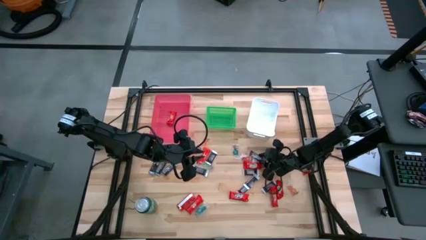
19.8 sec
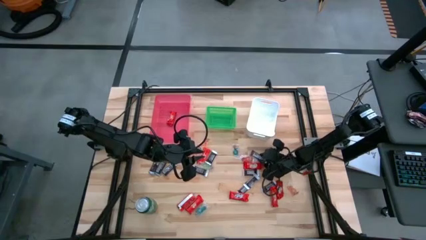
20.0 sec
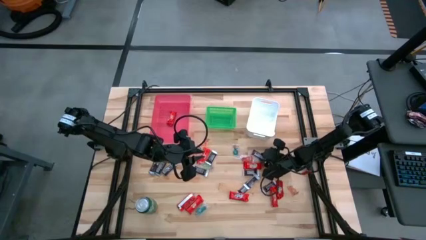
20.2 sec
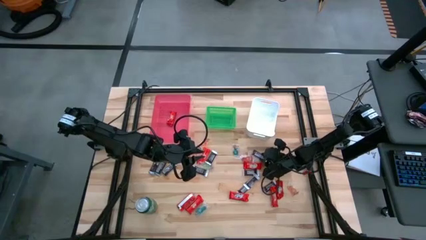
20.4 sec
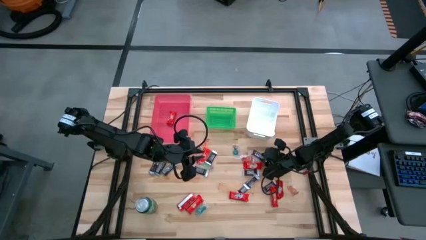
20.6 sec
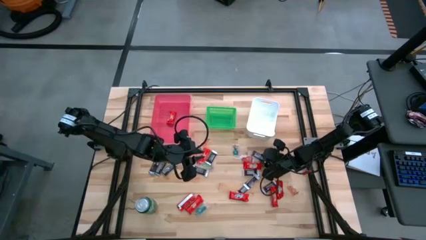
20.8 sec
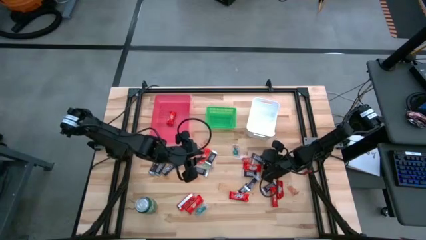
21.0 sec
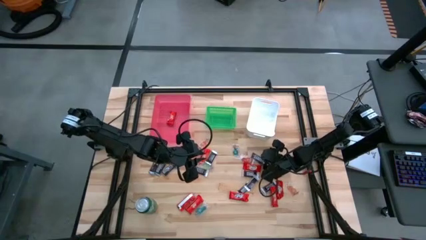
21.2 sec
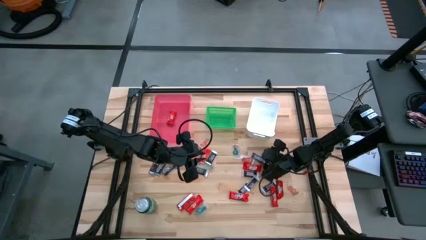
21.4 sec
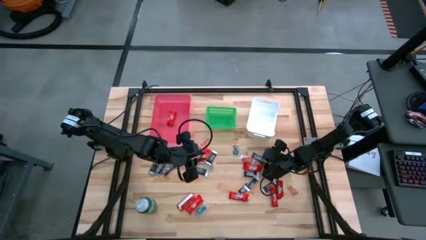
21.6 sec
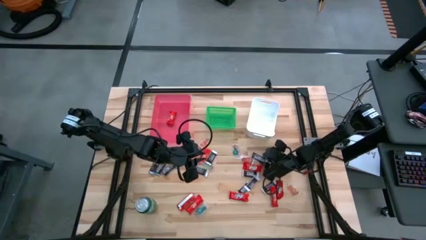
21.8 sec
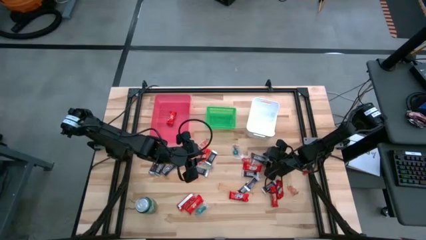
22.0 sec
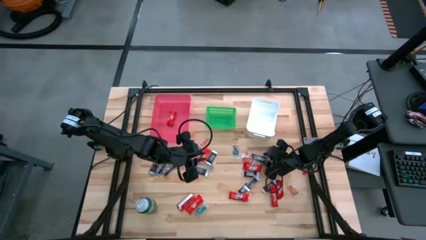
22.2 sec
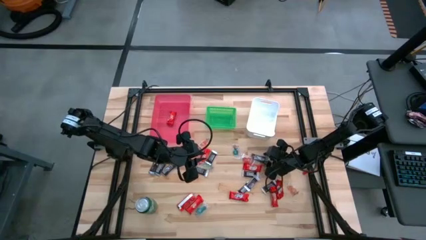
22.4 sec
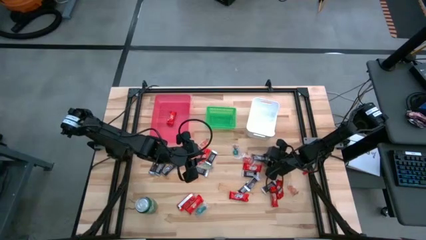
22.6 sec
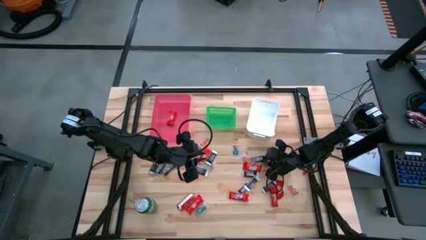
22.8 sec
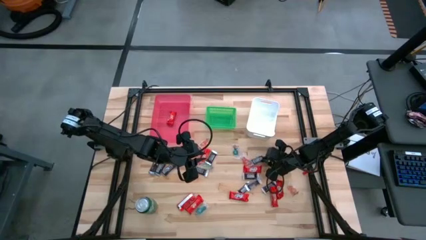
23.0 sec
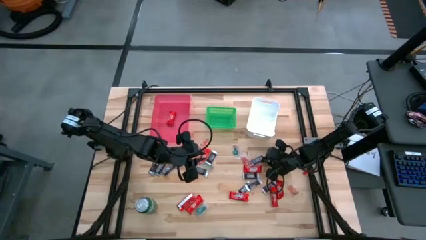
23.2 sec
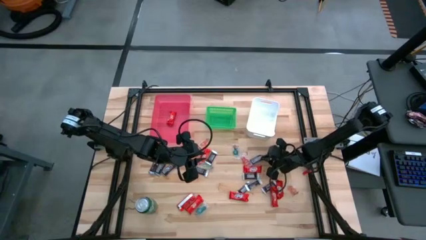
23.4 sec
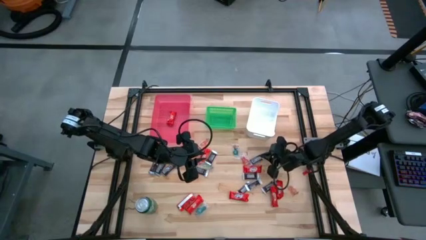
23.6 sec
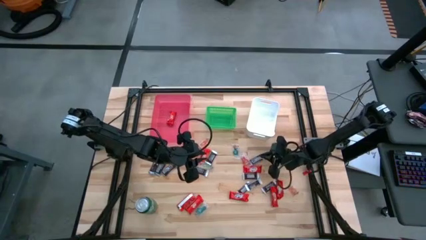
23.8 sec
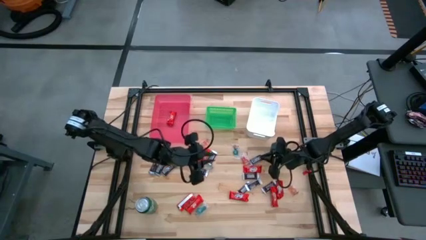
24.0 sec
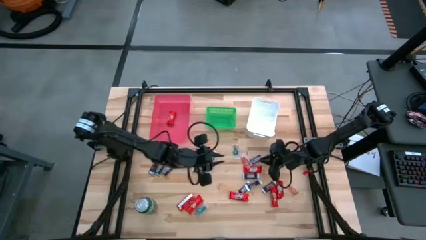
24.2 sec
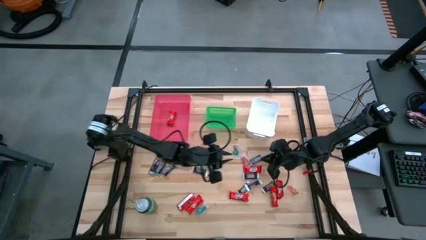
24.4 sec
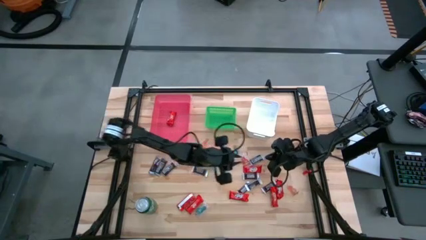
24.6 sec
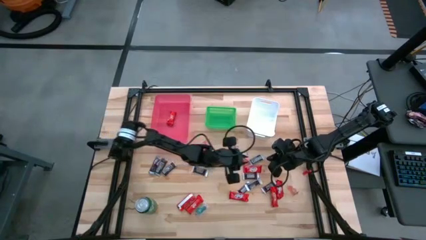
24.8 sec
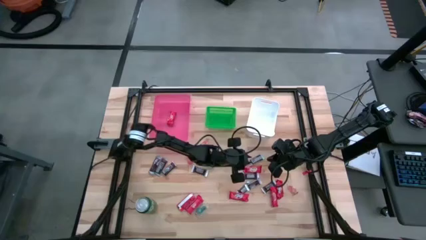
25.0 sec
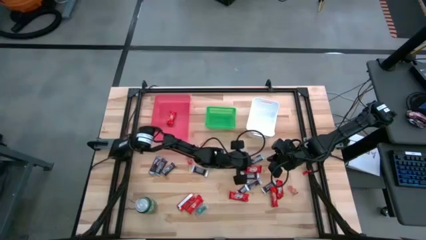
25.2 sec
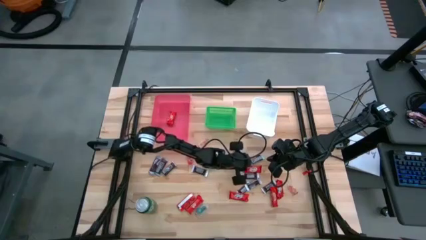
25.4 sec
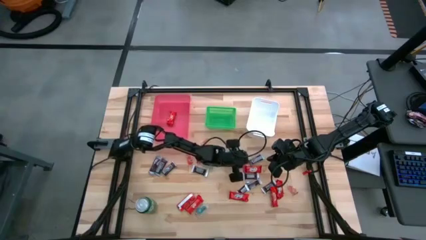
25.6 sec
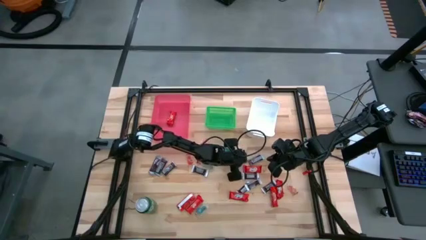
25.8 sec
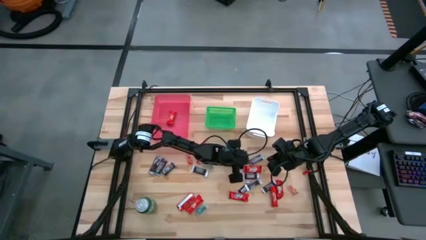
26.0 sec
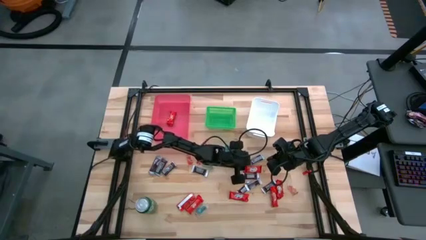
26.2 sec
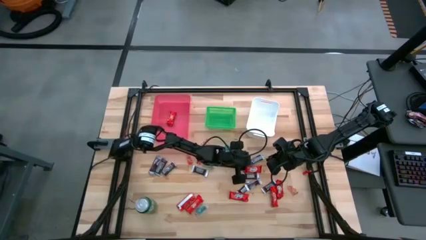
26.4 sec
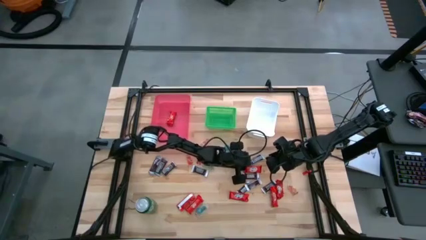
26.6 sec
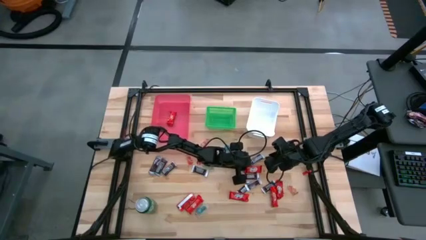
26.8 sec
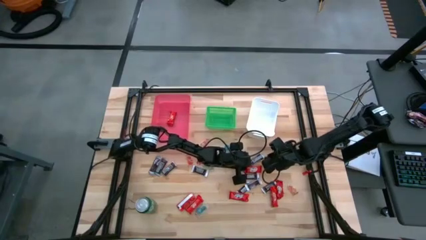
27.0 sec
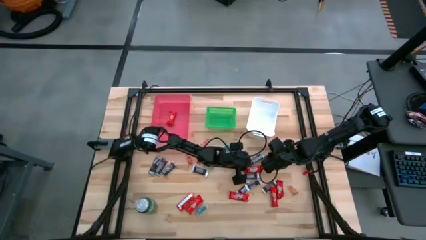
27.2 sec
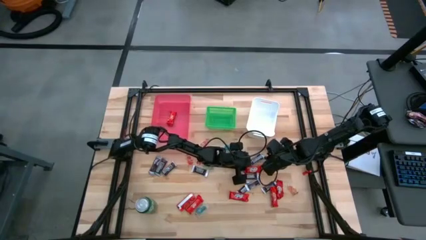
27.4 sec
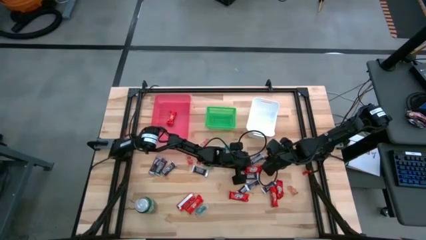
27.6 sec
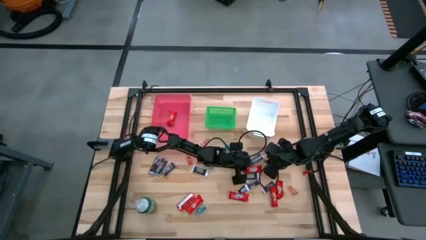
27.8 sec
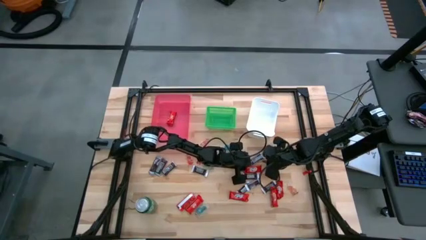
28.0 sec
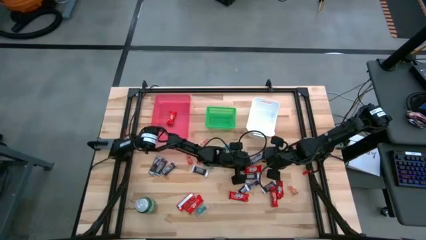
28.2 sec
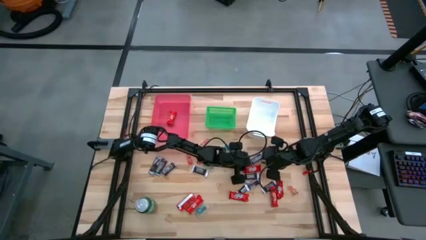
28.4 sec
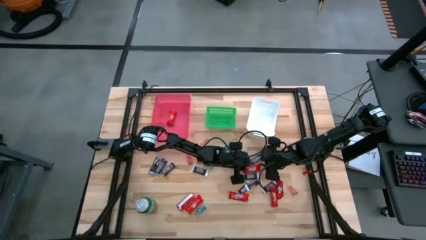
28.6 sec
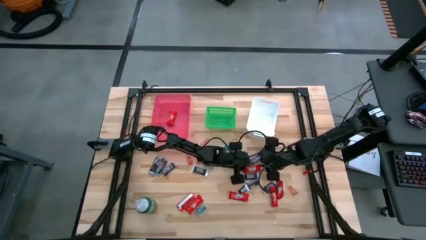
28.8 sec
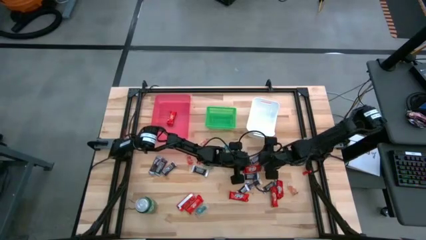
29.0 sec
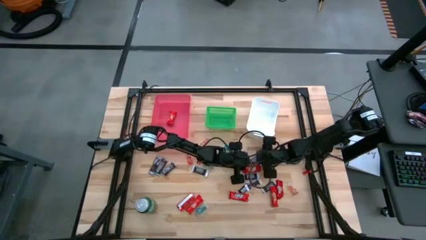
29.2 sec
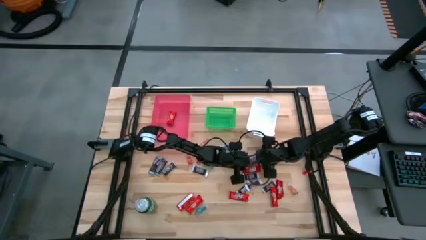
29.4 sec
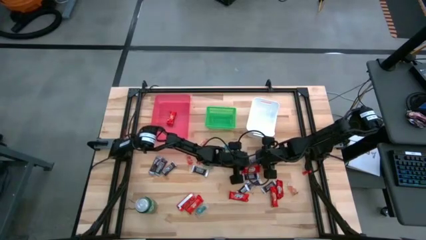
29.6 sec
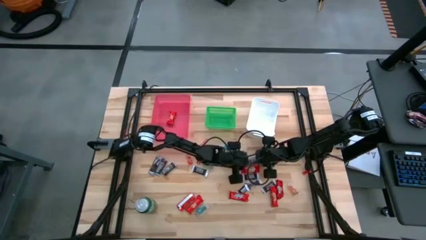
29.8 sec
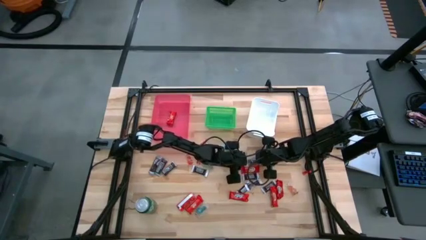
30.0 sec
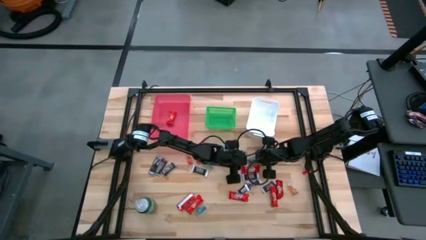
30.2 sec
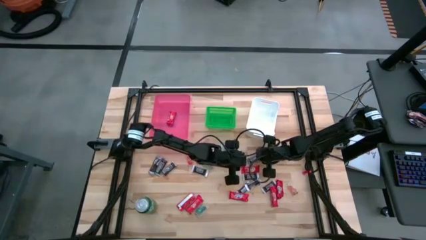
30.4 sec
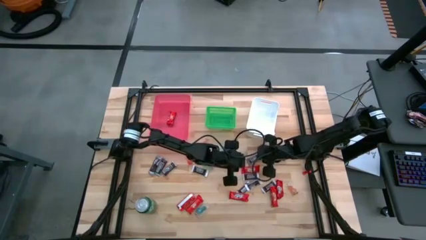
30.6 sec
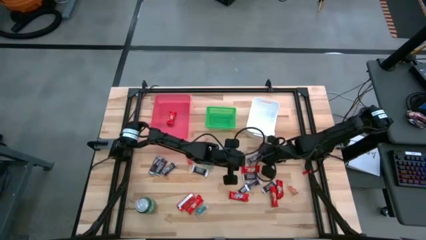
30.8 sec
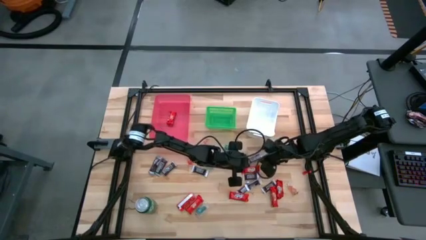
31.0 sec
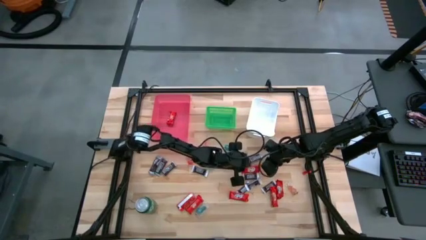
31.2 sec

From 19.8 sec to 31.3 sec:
Task: Sort candy
Put the brown chocolate bar into the white bin

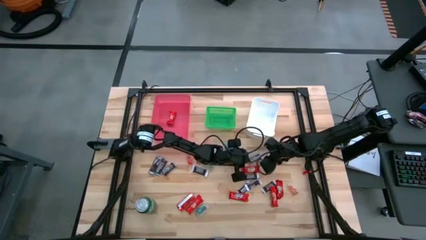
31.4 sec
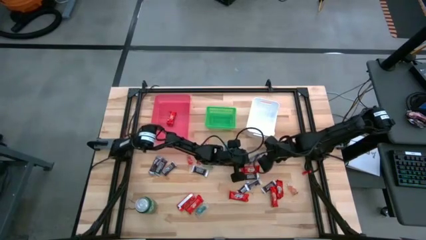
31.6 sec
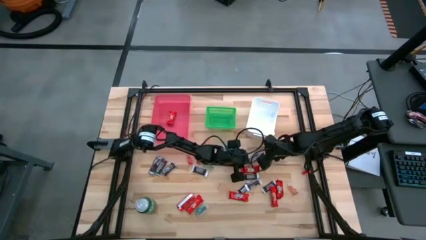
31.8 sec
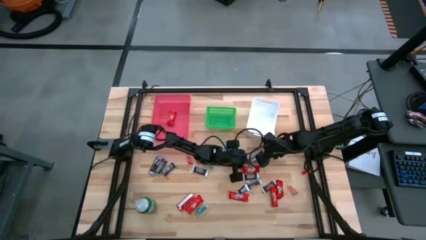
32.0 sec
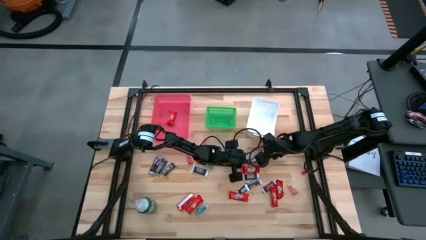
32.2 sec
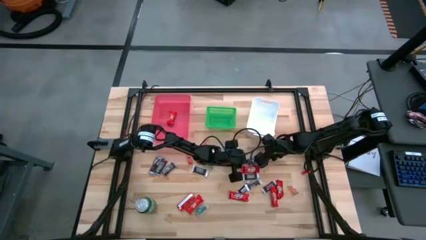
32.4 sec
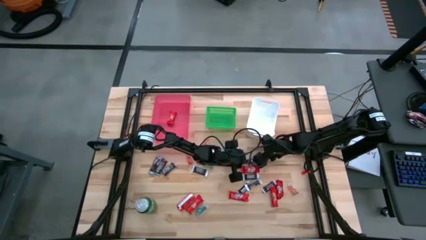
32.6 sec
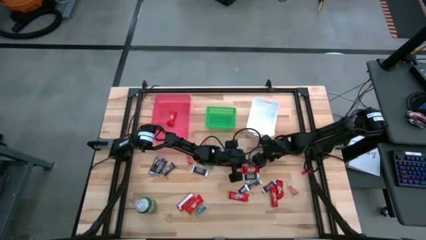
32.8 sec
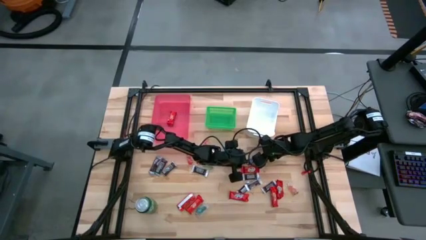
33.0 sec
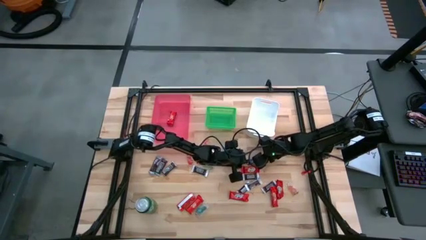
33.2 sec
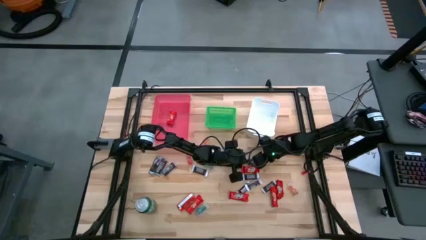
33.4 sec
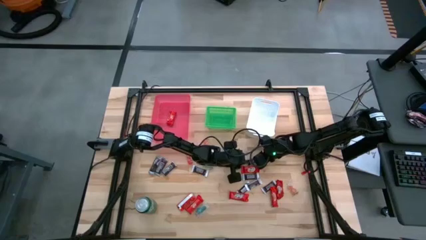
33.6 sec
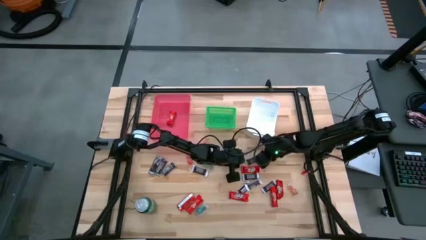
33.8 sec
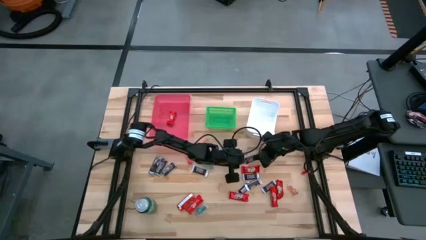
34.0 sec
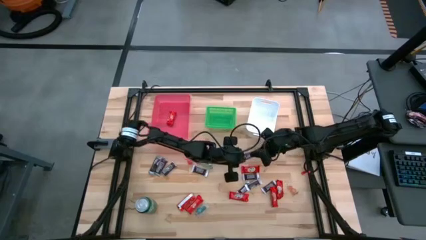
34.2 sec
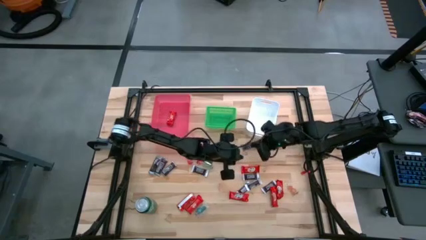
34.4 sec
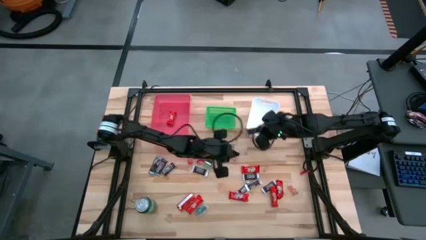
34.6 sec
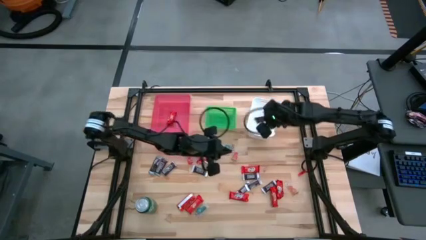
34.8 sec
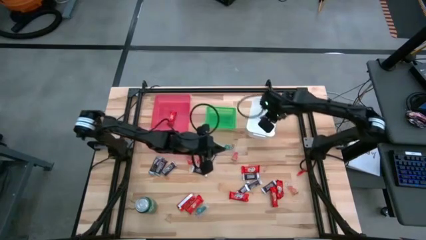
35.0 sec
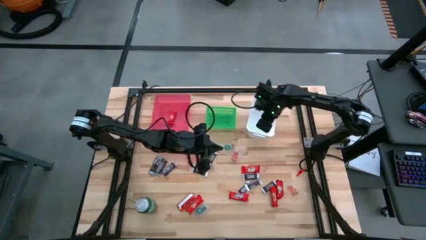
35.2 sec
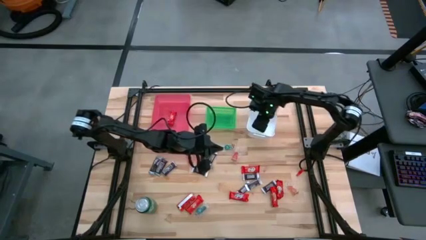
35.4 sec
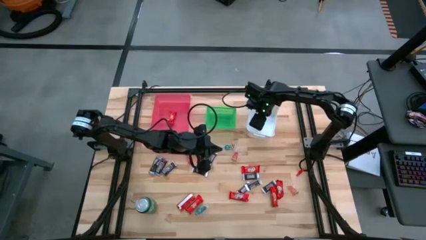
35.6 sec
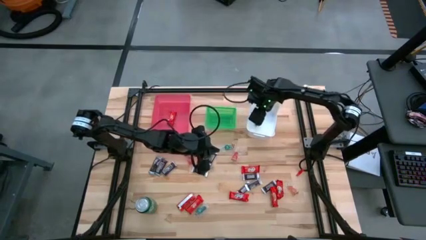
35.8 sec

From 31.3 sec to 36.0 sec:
Put the brown chocolate bar into the white bin
